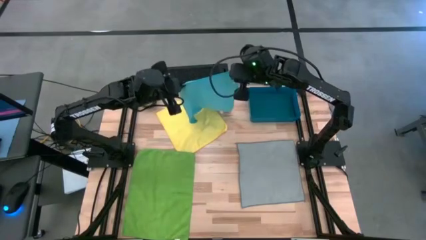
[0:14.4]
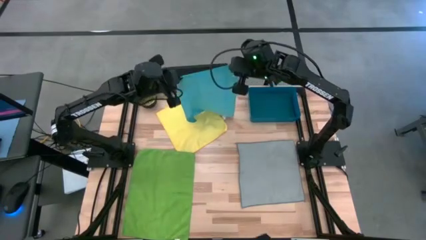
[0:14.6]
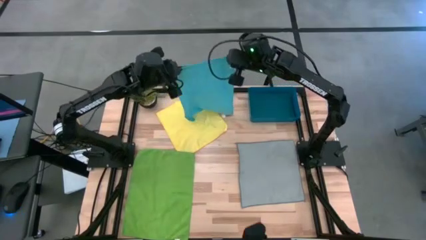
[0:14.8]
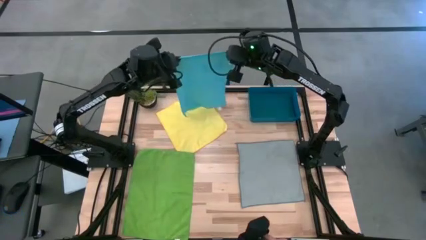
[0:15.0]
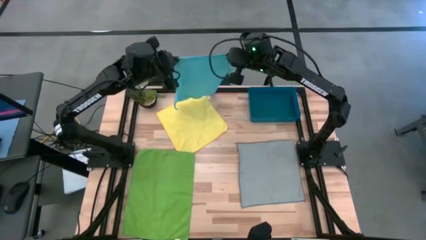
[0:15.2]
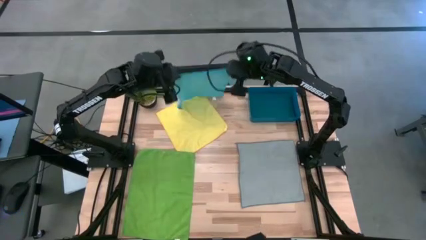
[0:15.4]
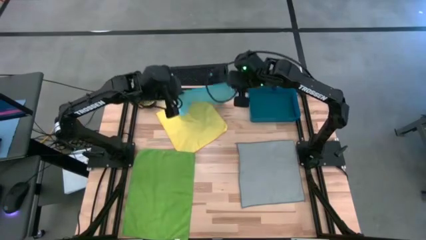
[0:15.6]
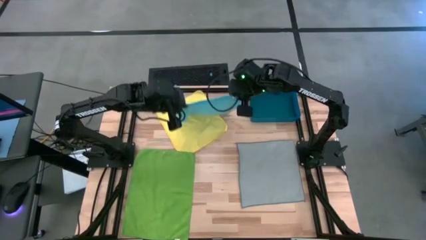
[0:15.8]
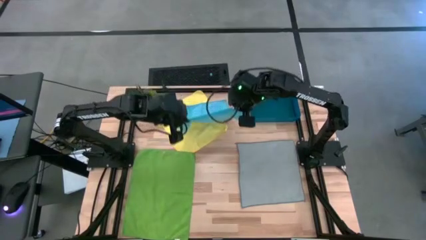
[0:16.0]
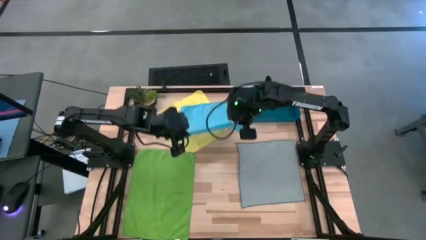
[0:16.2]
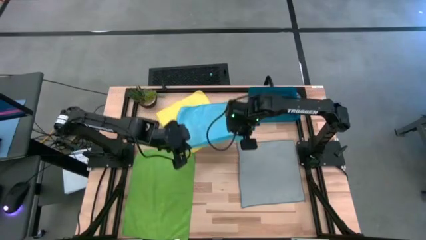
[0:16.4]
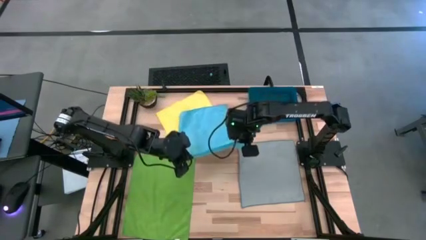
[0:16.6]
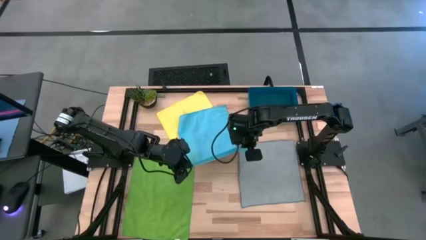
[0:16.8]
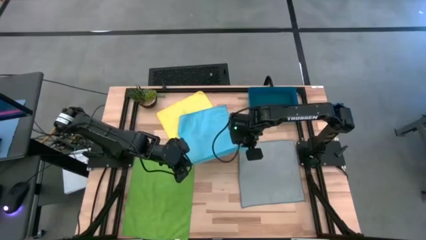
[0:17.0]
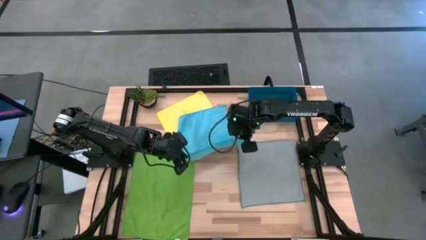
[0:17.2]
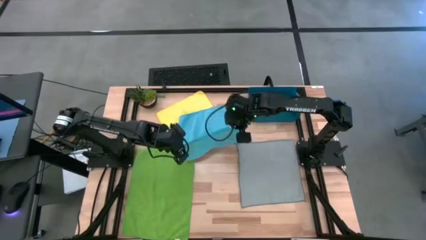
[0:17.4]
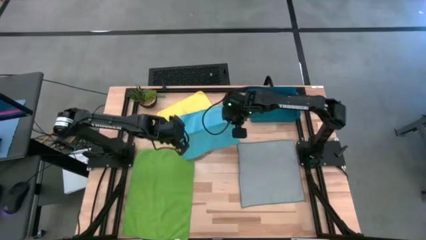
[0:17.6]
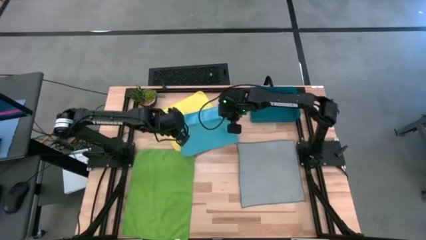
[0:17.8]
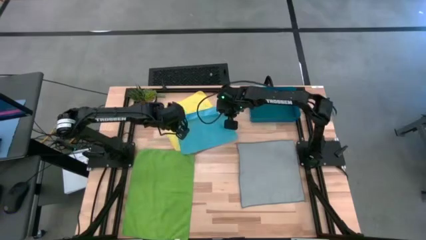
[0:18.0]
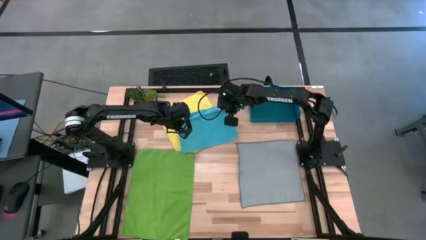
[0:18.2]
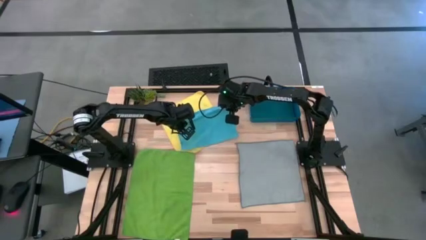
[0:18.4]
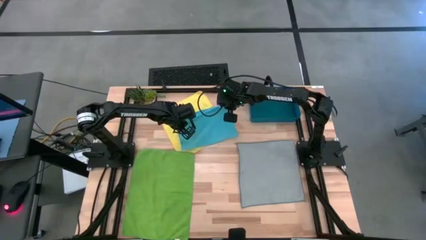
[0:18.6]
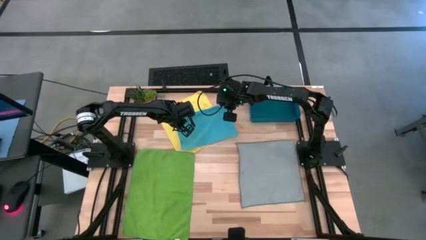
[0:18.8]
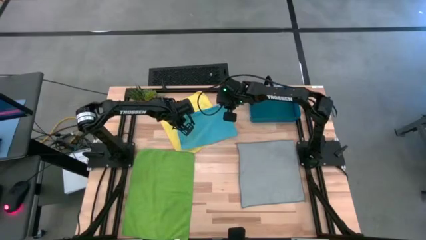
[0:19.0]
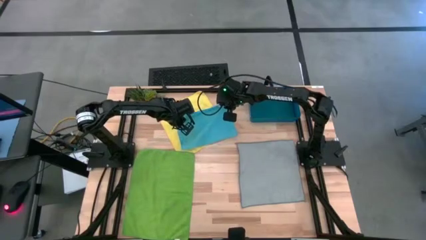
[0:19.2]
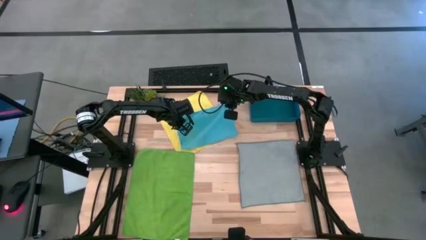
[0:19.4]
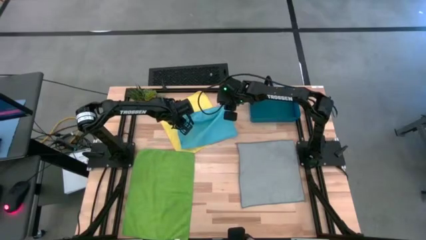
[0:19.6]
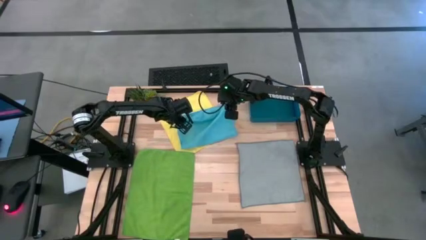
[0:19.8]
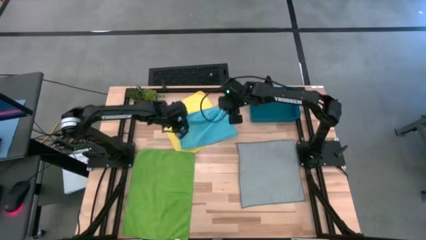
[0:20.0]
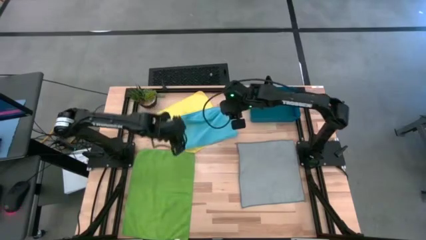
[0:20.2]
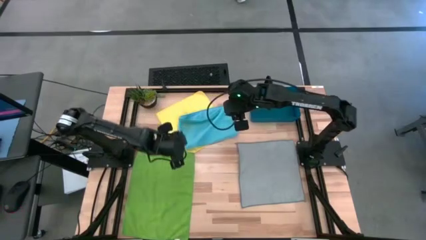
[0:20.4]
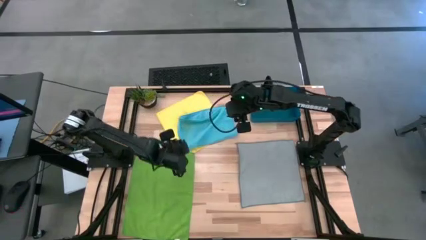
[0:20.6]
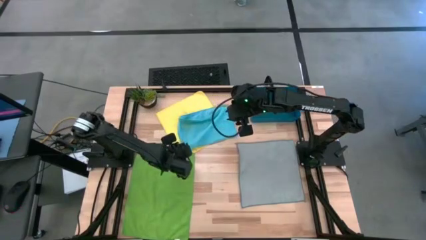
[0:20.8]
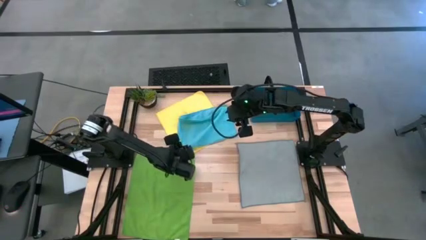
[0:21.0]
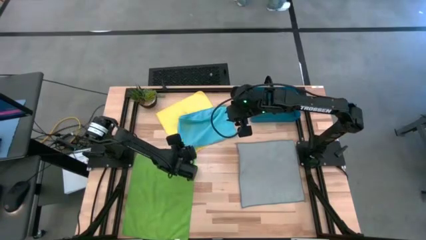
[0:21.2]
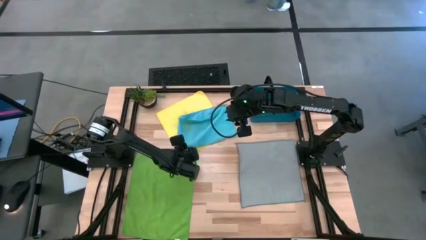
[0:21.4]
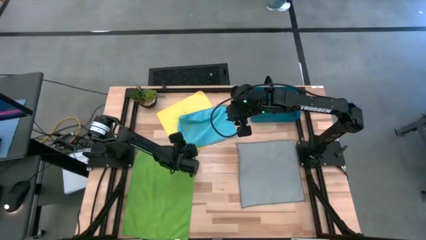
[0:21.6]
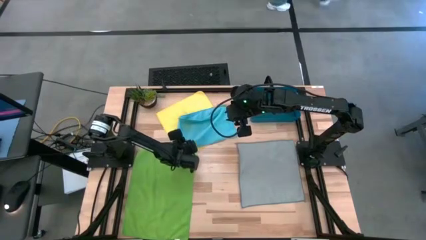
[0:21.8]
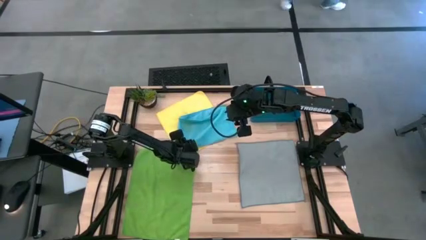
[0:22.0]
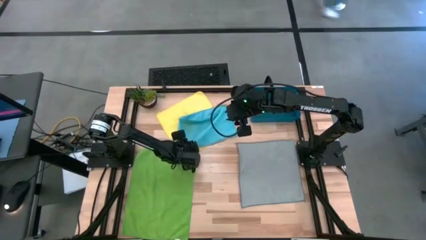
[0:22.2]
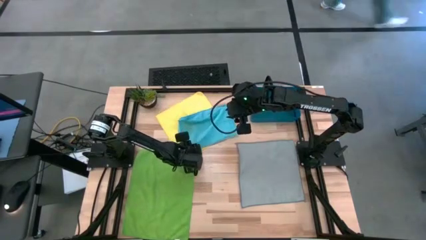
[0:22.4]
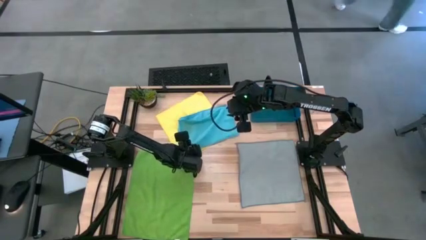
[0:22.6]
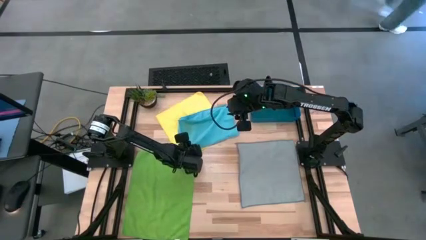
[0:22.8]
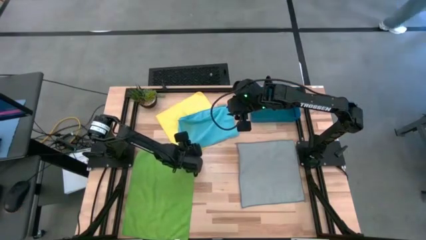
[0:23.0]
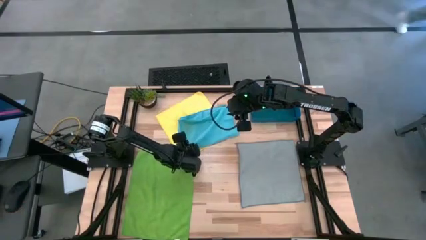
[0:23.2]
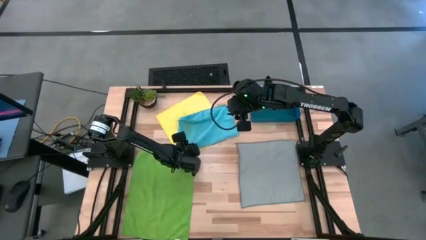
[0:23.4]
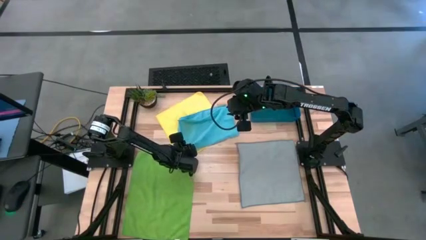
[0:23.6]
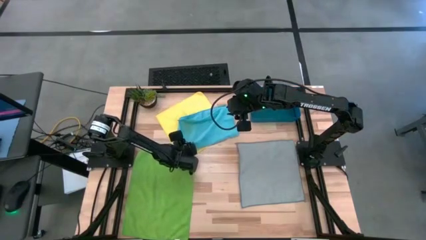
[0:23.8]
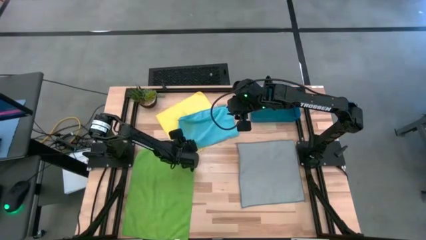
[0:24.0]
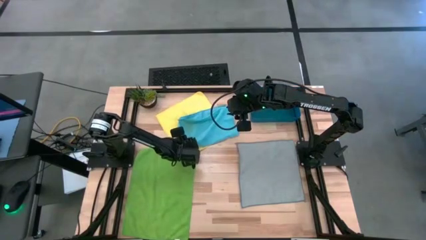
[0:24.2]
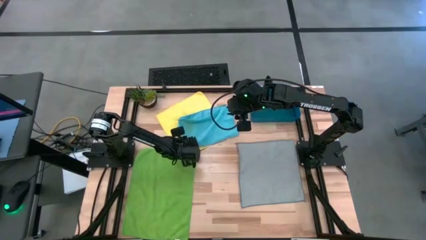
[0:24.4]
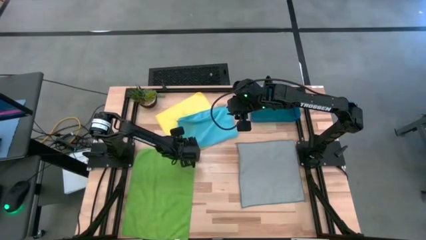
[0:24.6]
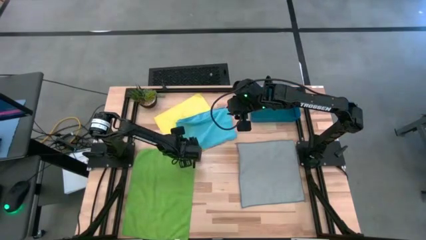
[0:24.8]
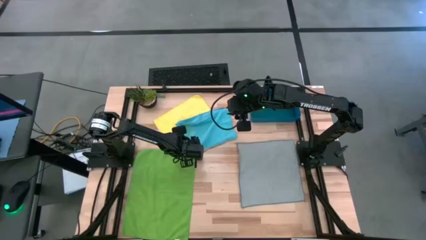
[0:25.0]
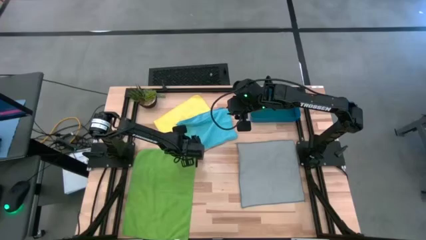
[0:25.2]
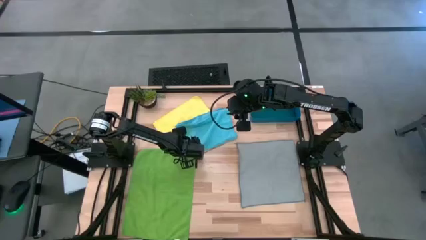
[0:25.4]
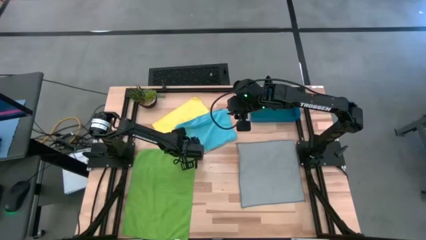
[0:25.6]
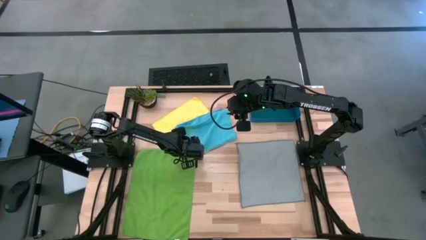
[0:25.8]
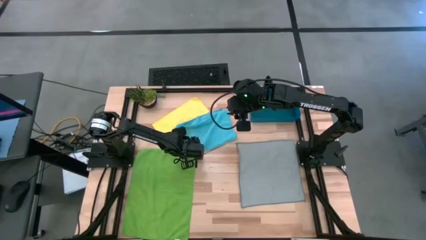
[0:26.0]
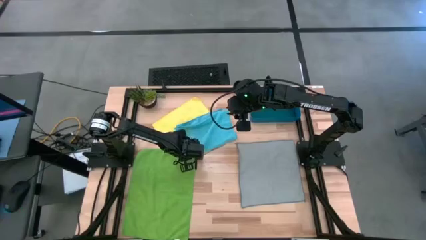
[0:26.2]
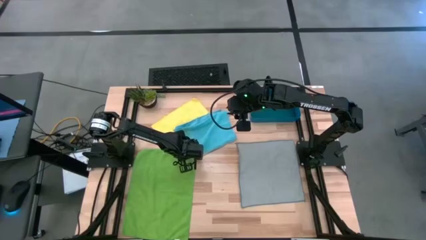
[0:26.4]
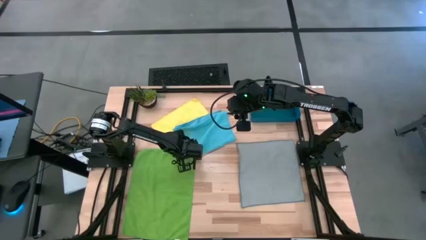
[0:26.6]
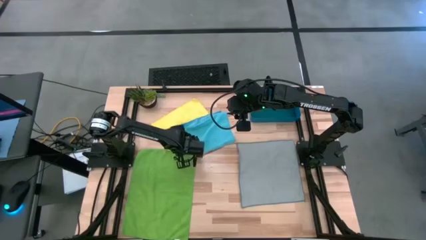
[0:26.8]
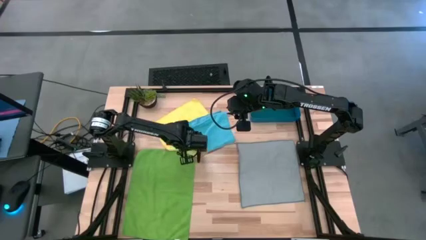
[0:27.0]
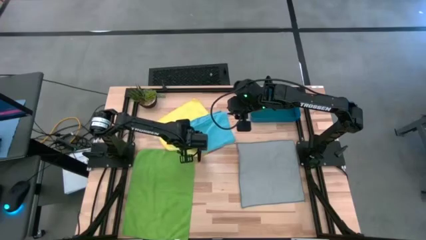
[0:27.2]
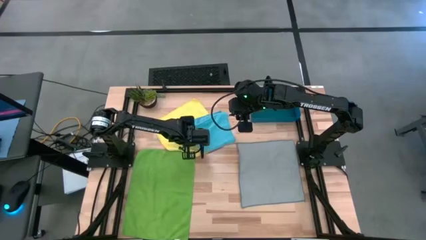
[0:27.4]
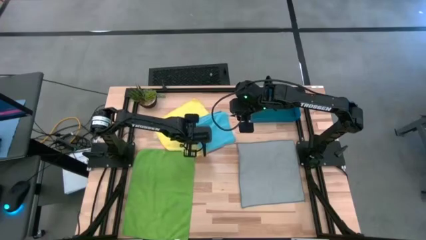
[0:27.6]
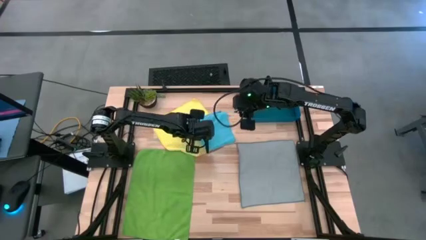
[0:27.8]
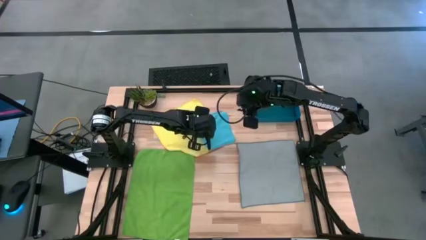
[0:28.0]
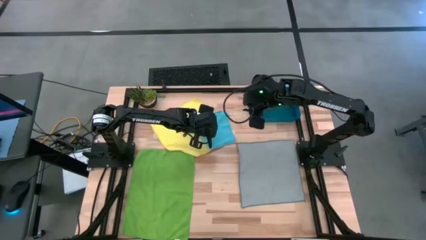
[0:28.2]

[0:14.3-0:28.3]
Task: Fold microfiber towels
Fold the blue microfiber cloth
